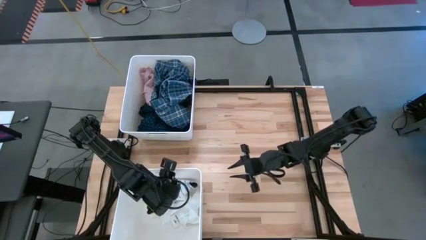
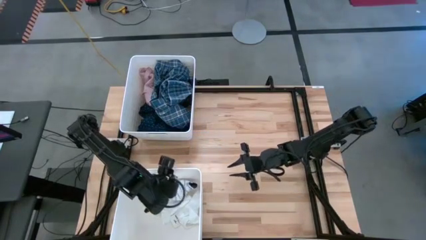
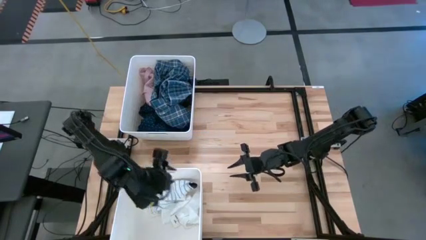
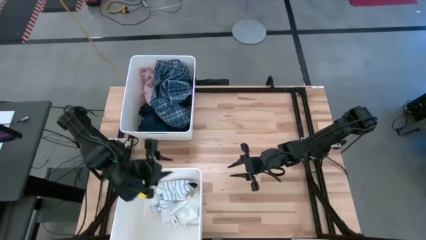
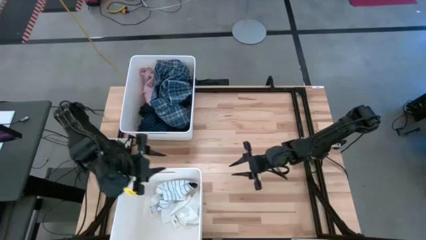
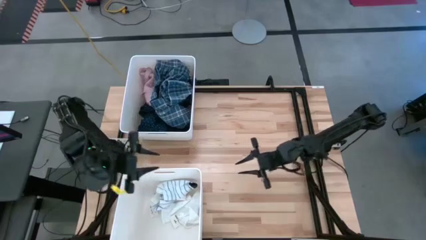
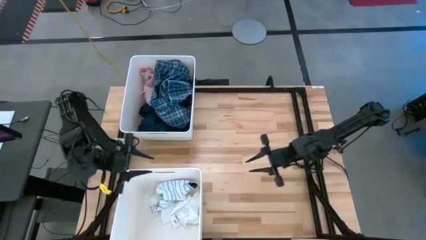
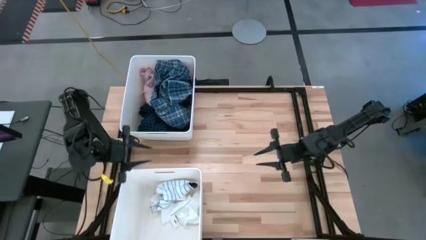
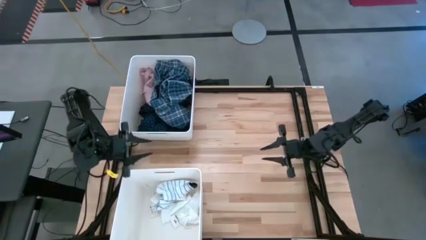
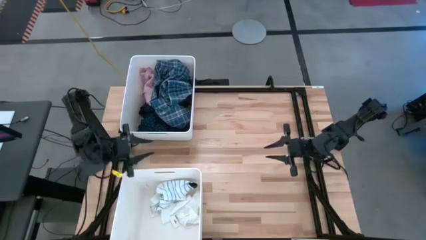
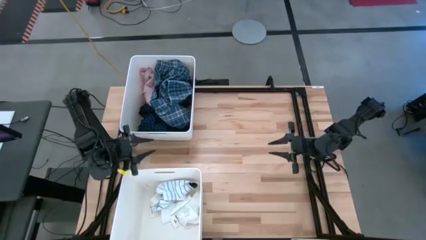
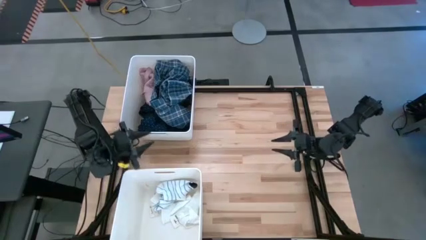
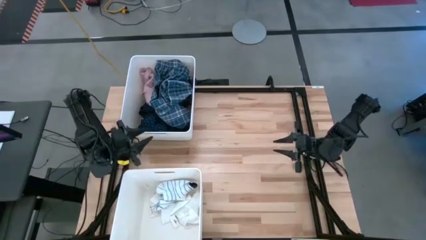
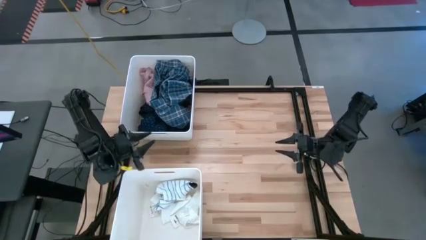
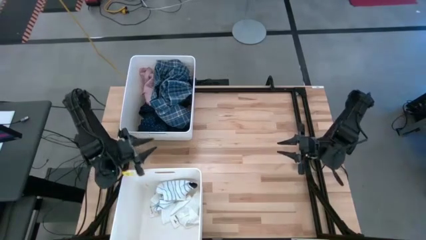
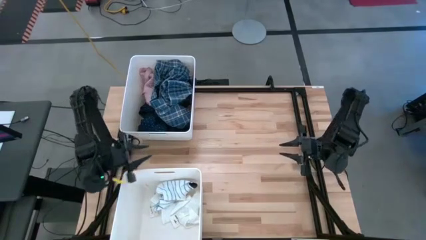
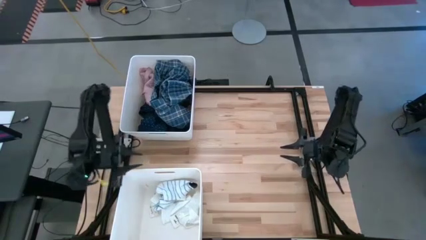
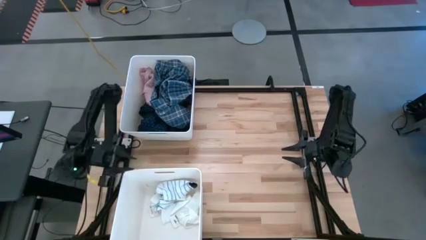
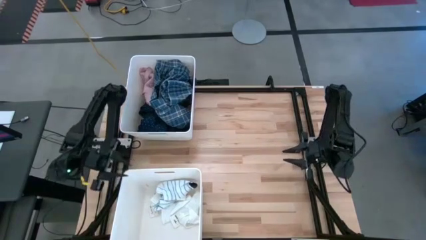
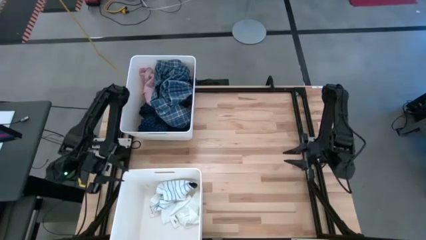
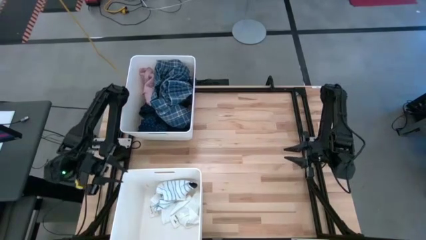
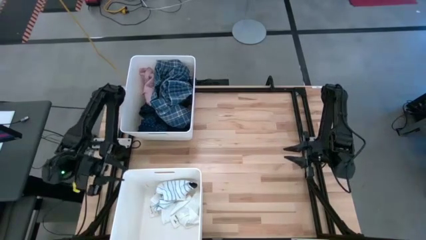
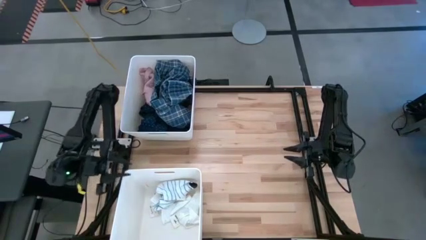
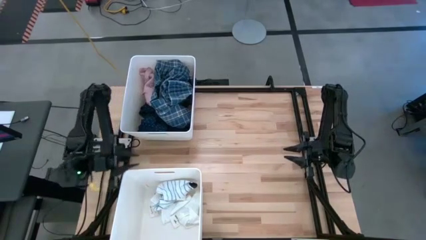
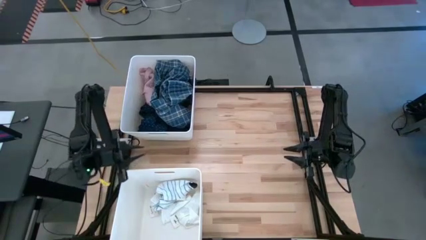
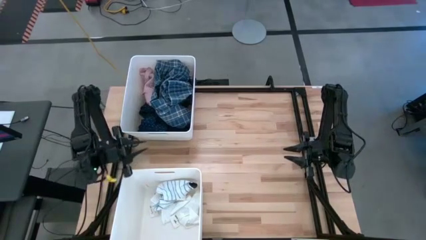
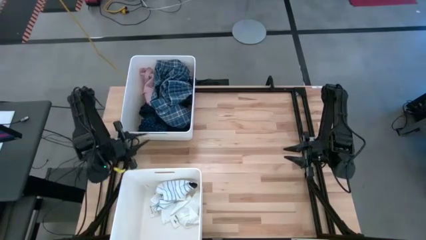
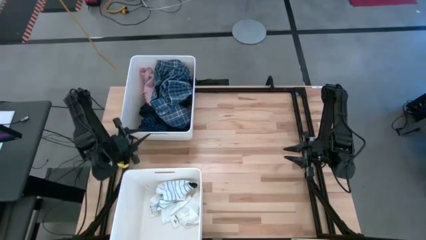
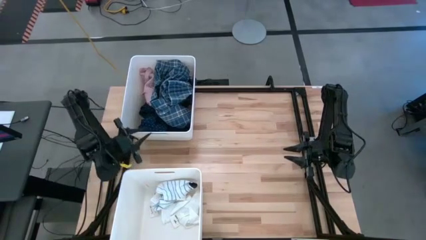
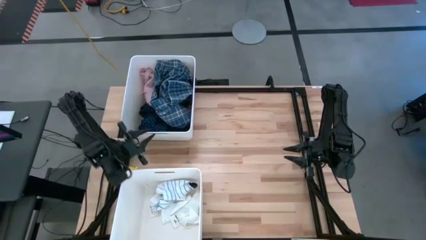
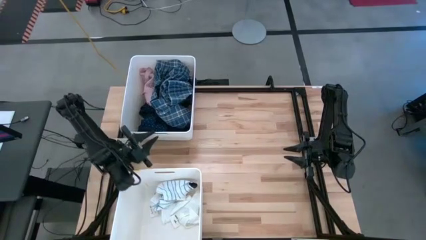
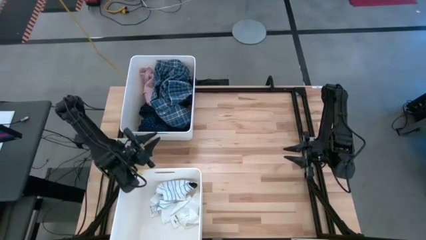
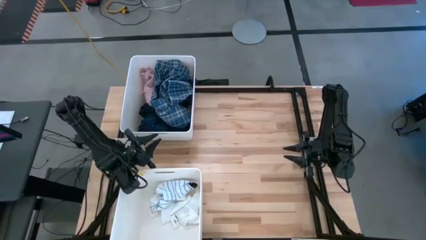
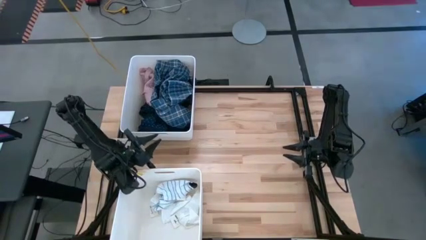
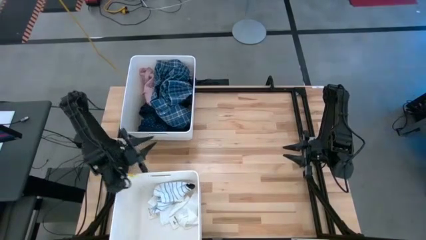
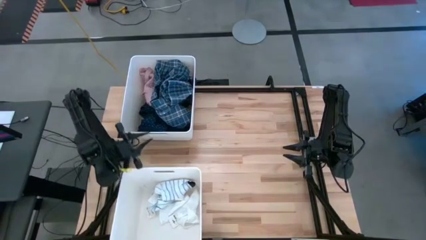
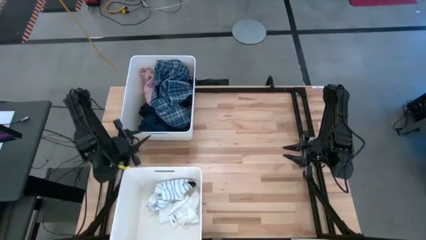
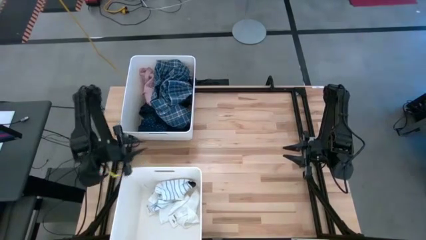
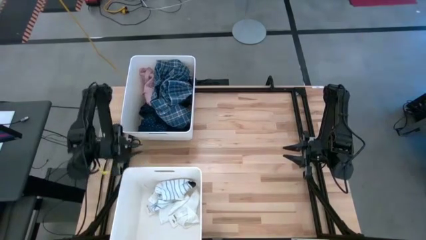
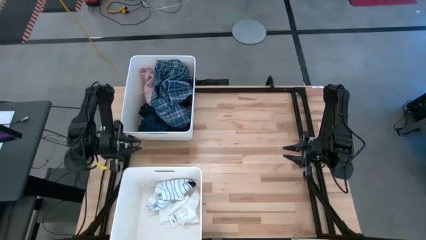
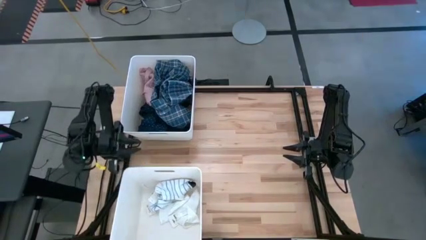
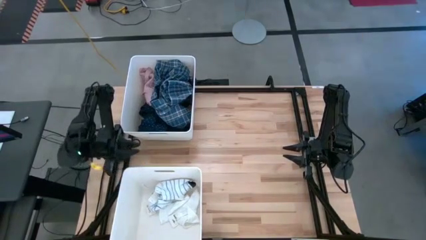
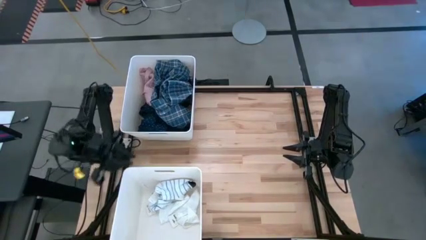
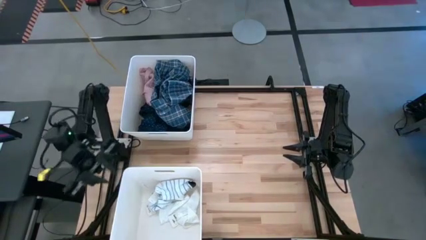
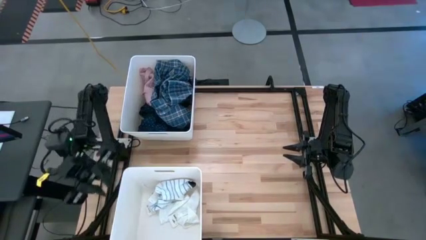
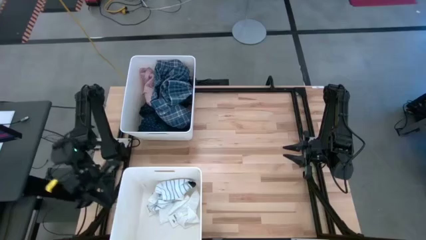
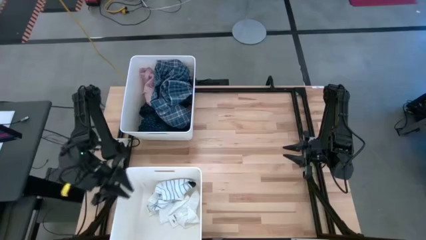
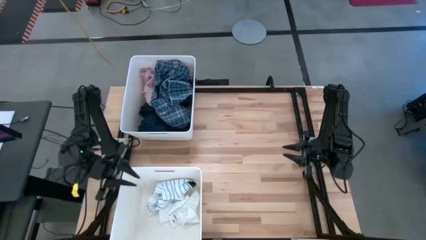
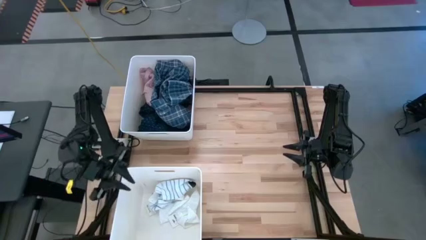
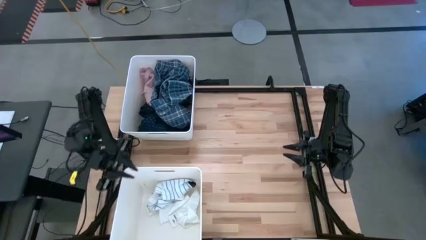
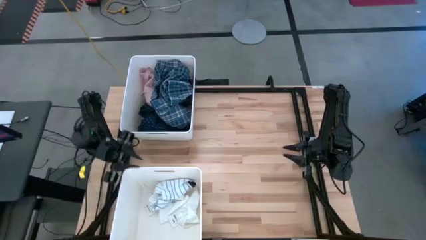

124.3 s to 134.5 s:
Task: Sort clothes
Return to Home Position

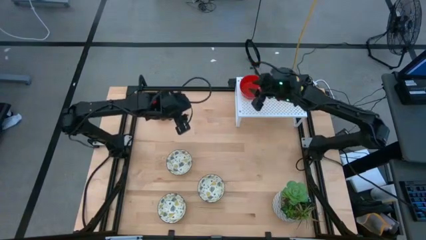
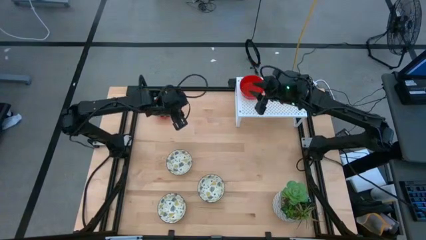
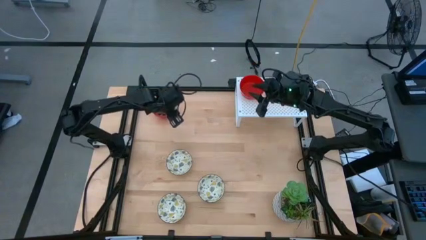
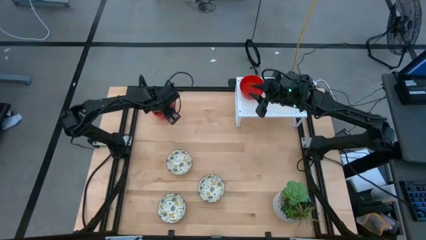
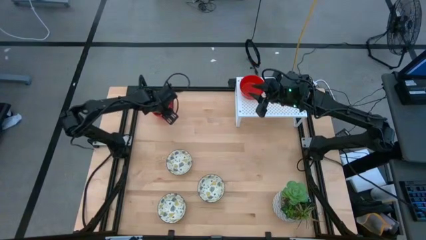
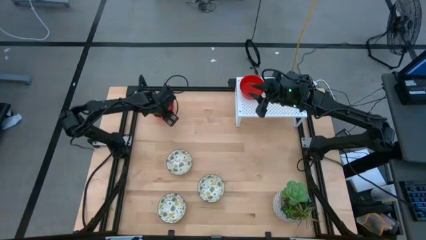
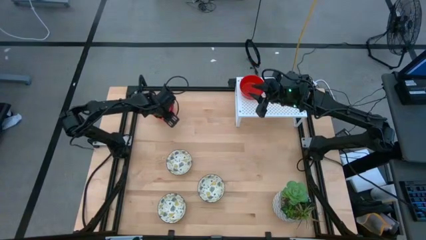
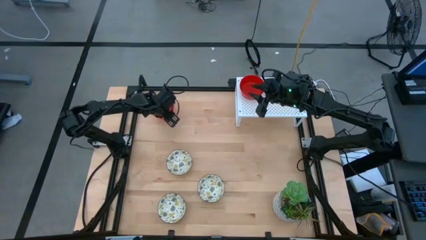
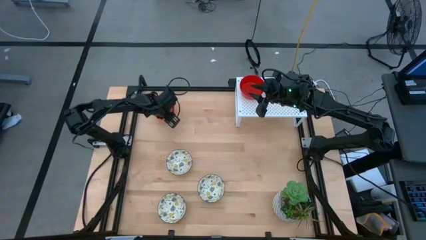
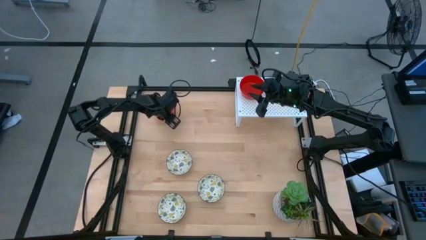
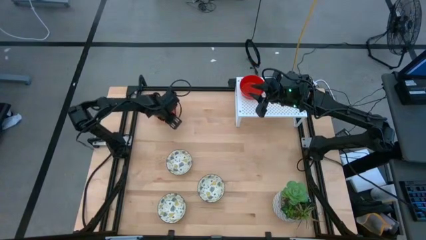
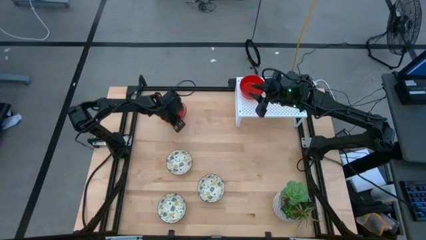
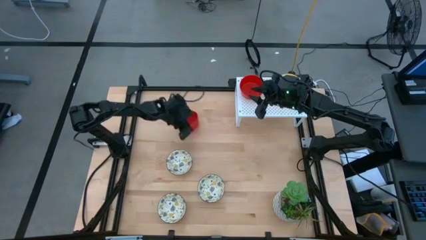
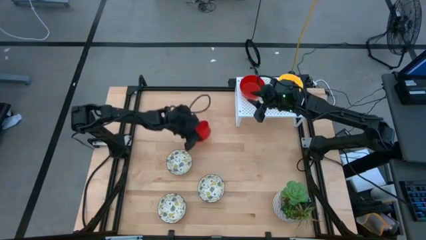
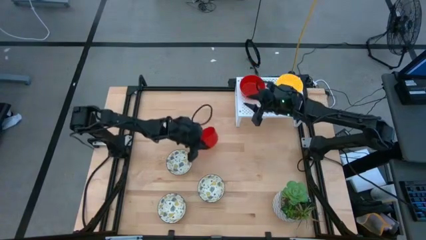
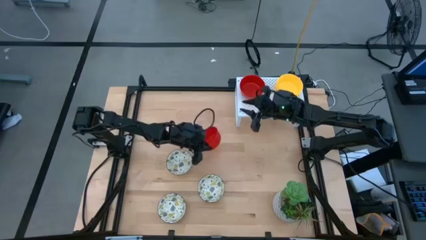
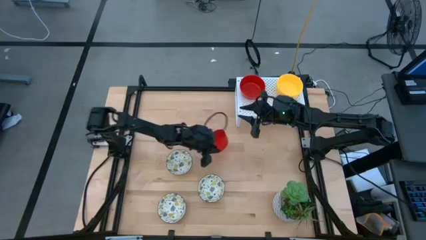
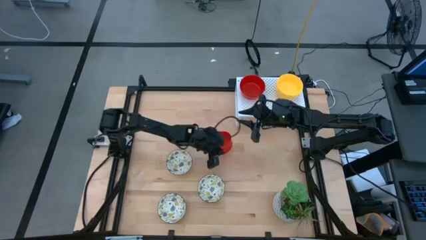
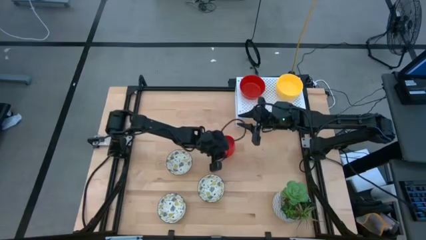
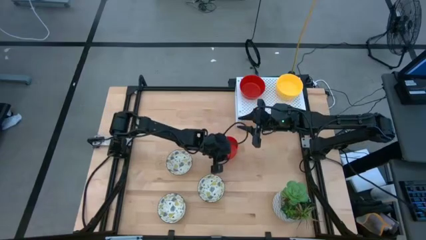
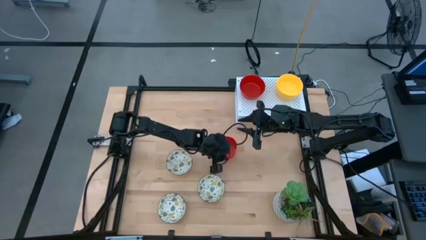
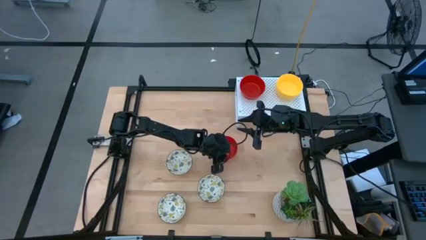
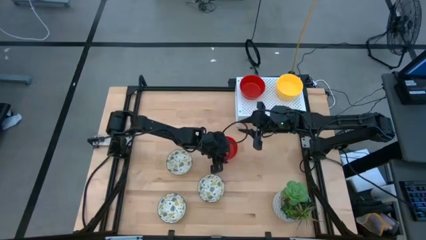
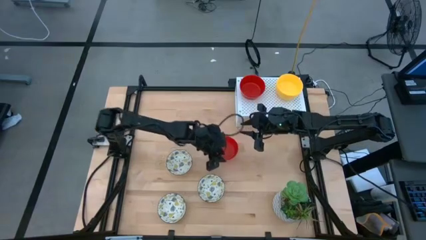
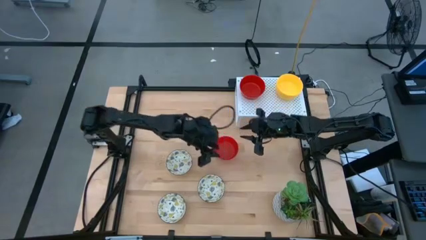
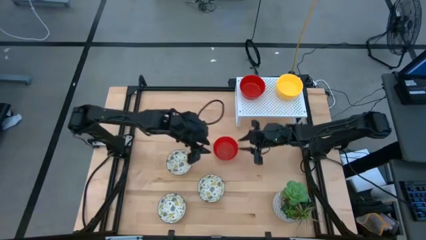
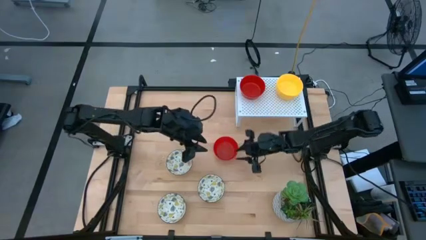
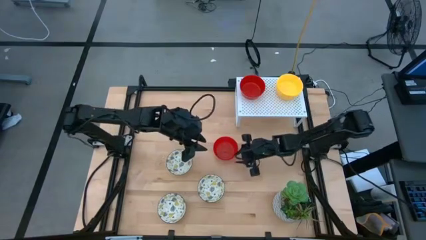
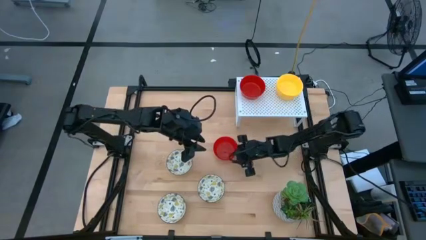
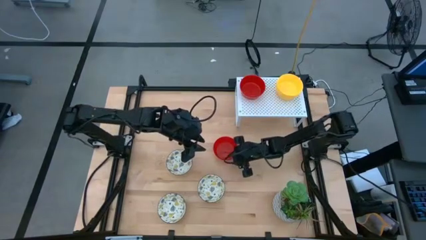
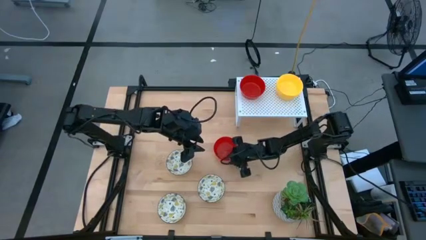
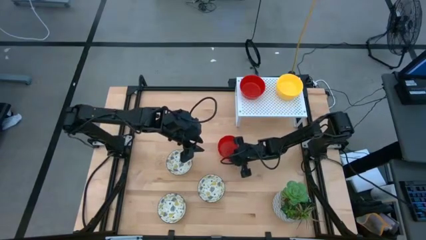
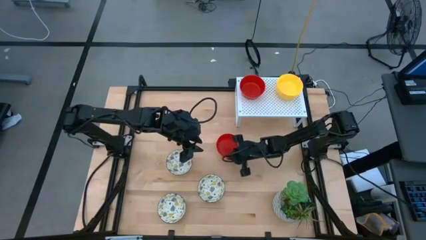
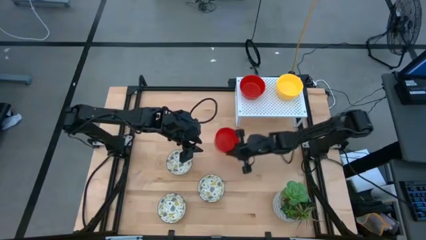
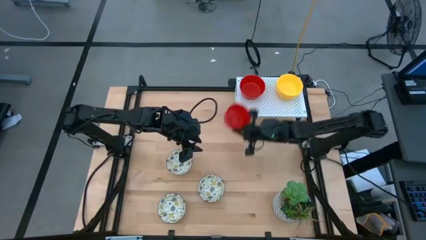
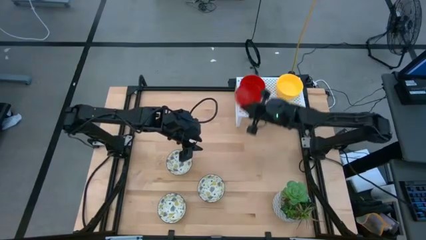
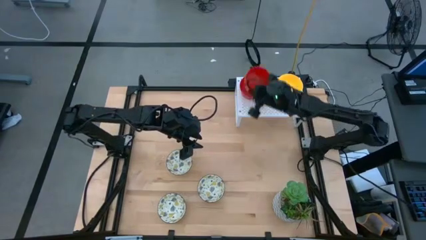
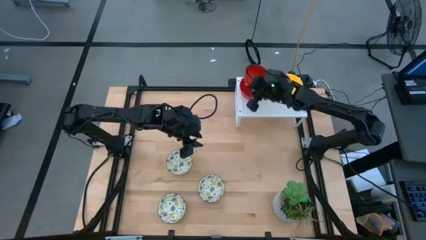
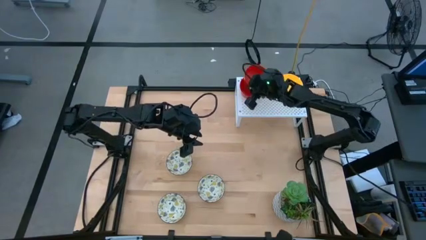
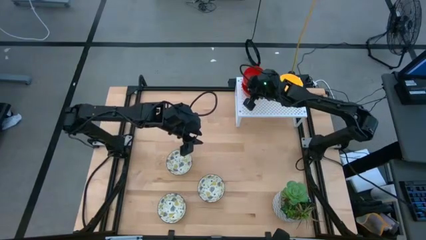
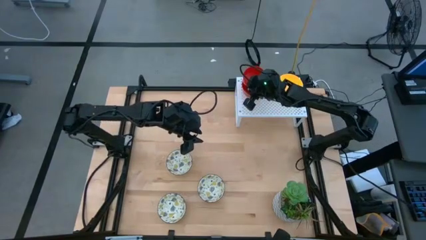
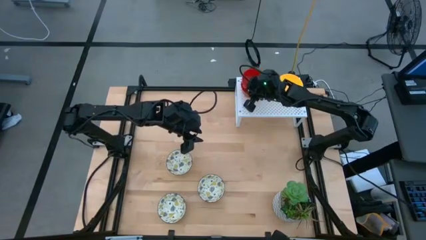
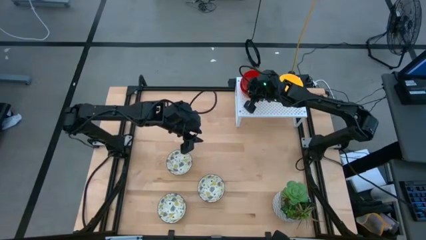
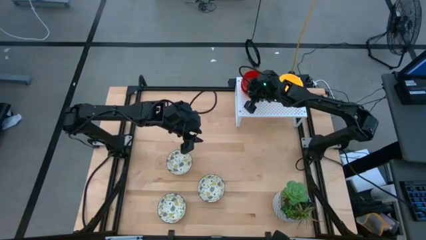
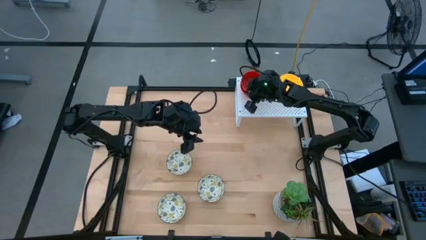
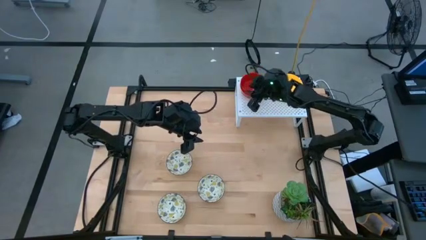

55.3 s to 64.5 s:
Task: Pick & Place Mini bowls
Stack the red bowl on top of the red bowl on the shelf
